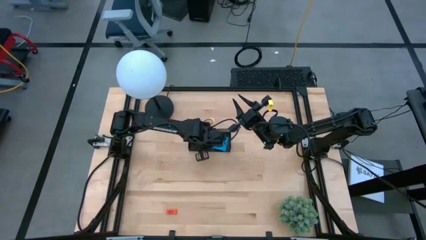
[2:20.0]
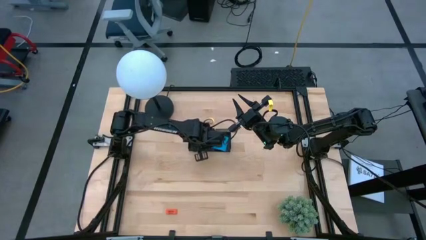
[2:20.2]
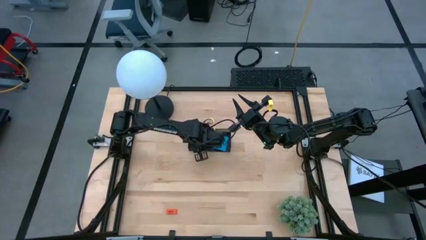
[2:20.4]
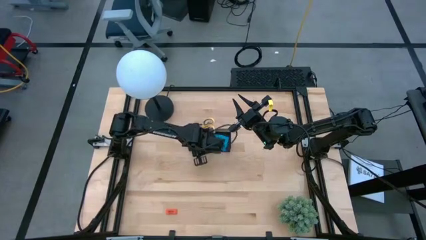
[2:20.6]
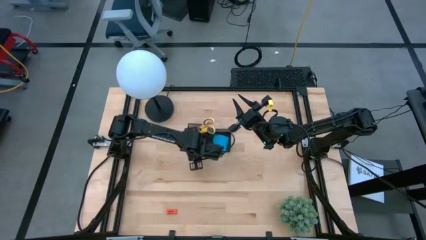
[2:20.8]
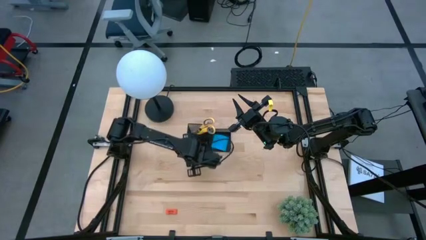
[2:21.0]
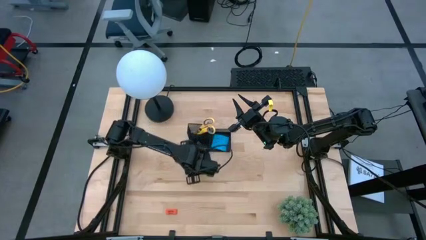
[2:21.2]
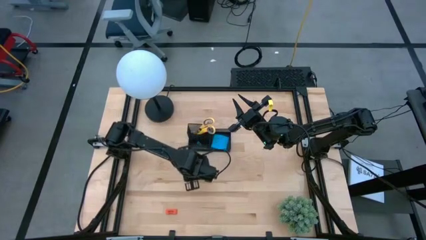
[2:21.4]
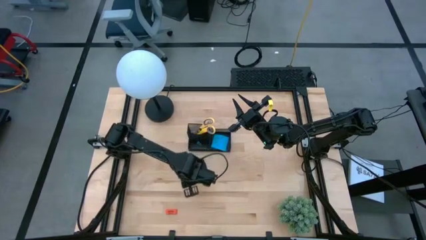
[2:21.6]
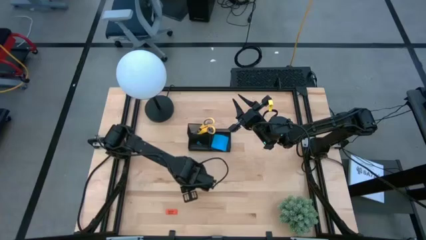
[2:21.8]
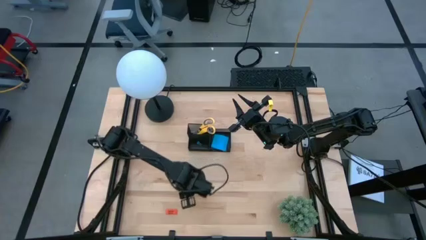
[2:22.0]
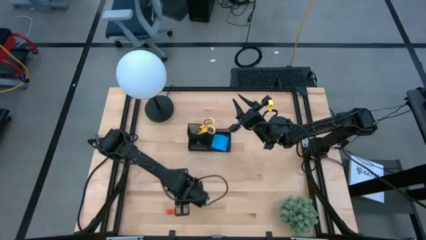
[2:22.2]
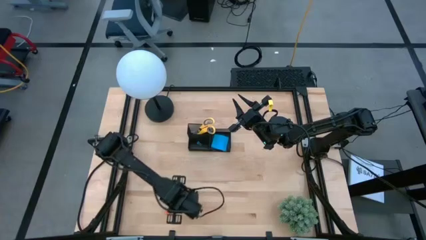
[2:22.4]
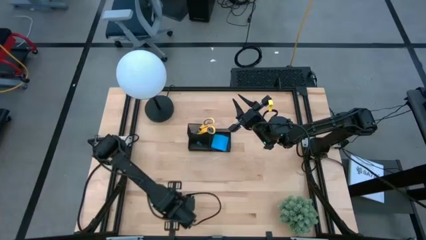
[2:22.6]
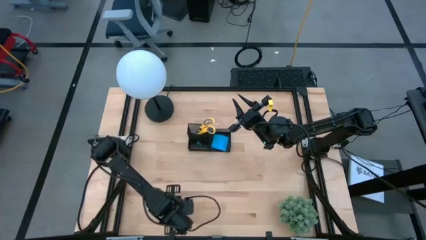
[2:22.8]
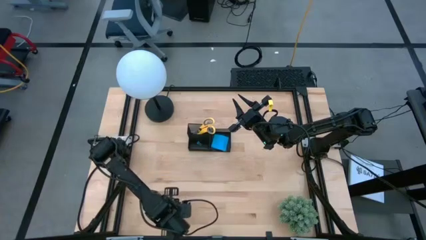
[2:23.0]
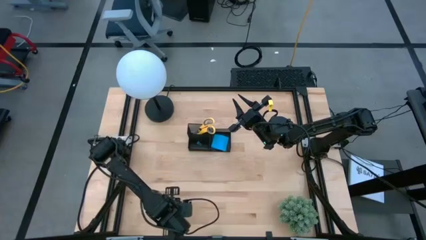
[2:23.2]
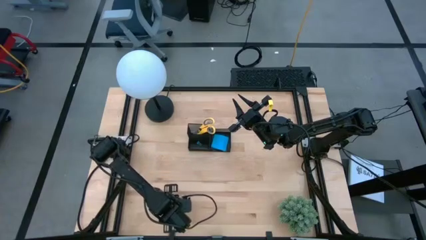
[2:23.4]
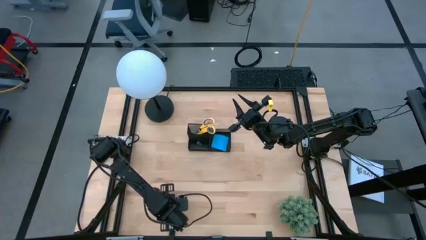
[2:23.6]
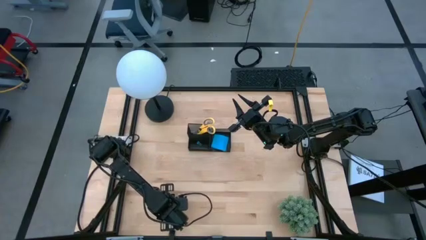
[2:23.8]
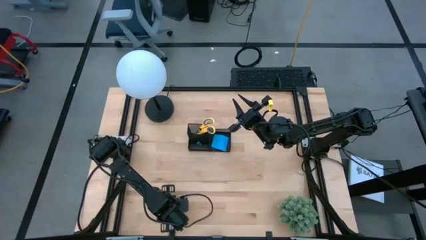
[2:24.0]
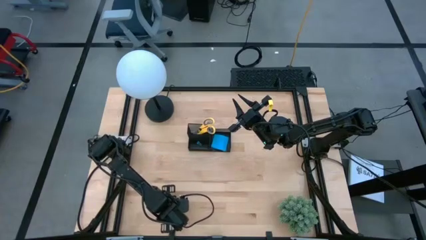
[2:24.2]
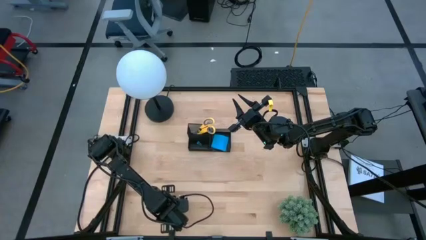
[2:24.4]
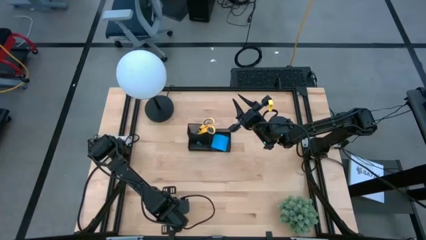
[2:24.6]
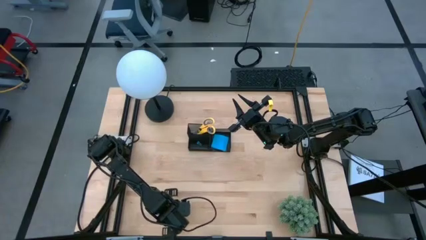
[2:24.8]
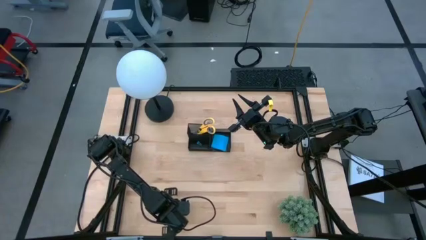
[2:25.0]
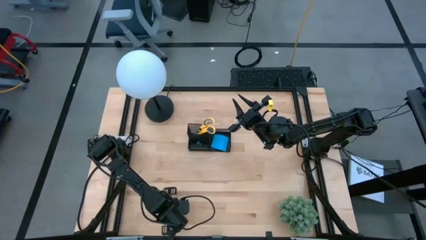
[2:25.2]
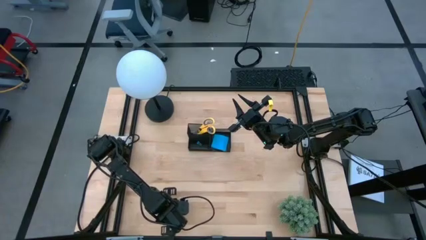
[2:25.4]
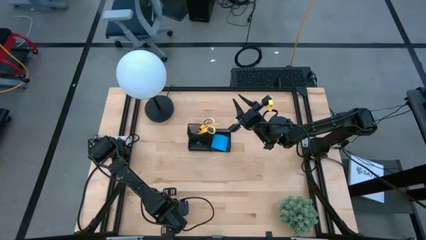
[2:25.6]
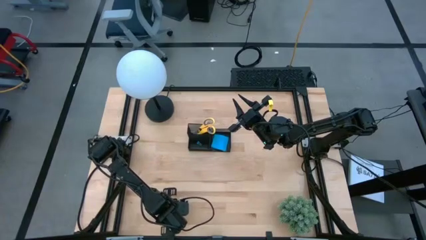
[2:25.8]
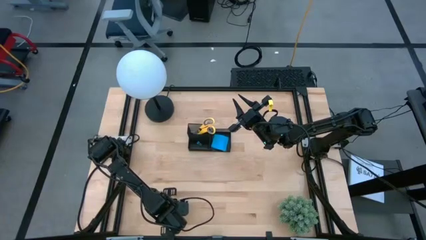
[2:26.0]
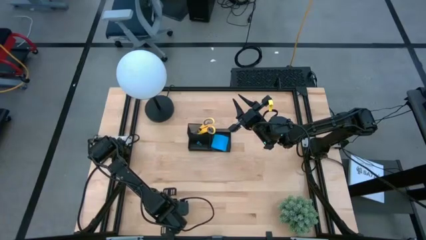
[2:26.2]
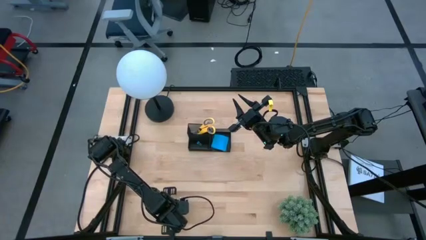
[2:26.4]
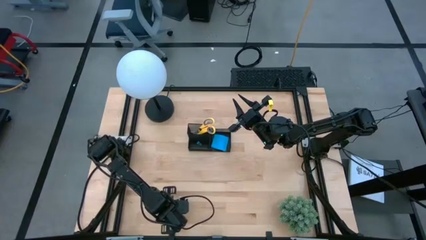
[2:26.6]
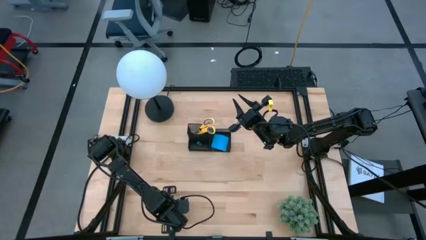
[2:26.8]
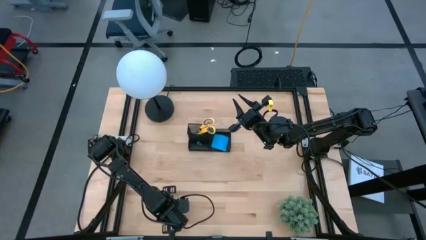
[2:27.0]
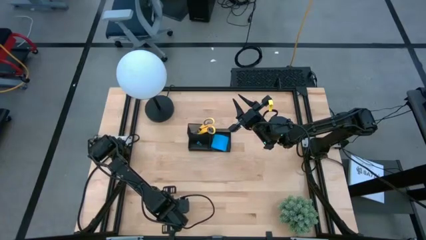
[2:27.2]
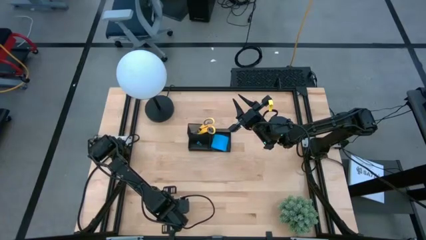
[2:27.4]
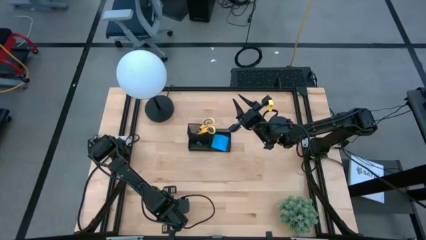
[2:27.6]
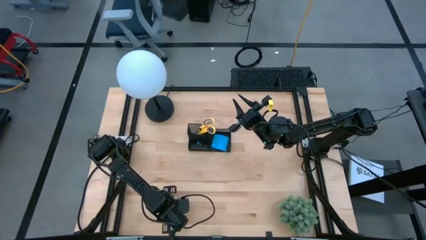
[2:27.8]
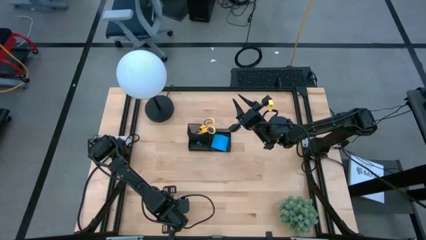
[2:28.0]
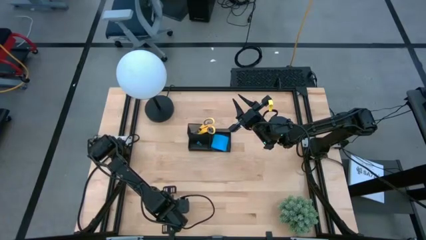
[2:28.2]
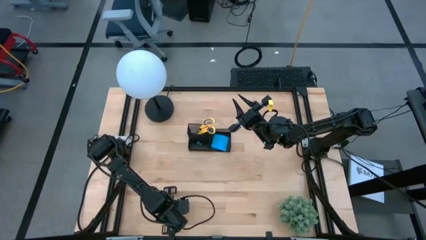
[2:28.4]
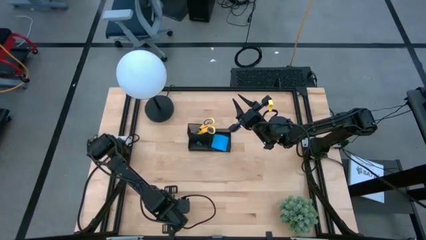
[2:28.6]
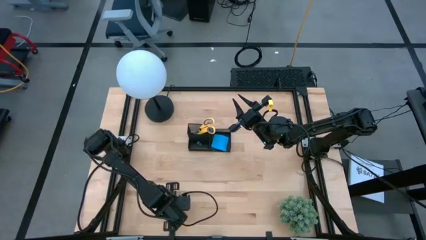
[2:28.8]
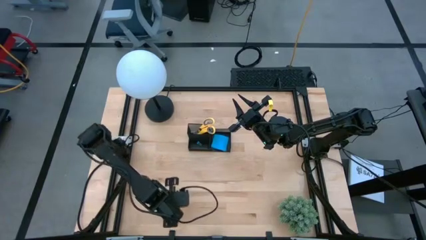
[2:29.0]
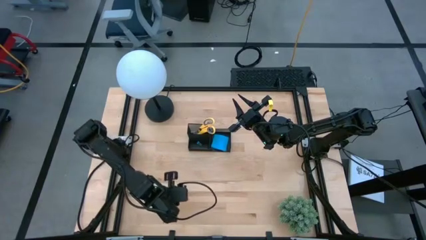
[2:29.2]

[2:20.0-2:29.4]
Task: Pick and place office supplies into organizer
Put the orange eraser into the black mesh desk organizer

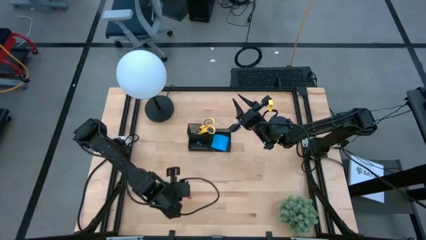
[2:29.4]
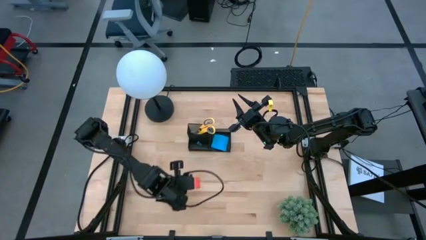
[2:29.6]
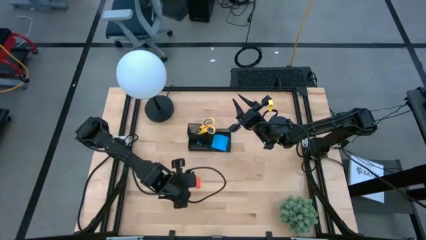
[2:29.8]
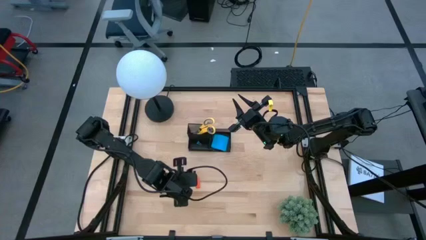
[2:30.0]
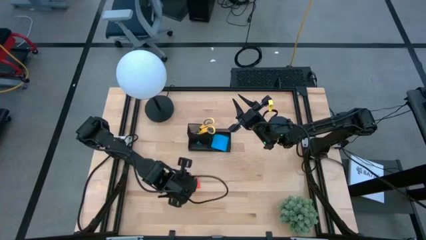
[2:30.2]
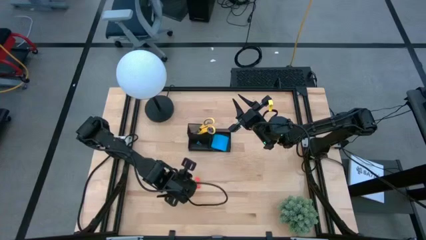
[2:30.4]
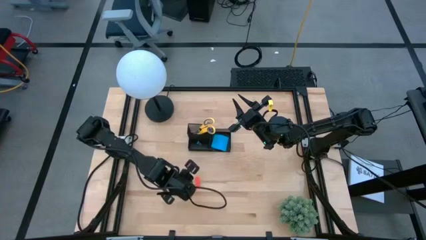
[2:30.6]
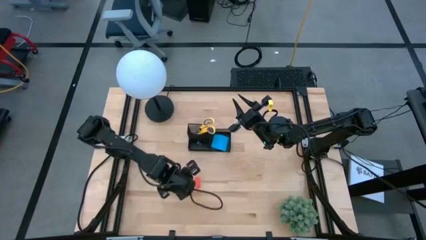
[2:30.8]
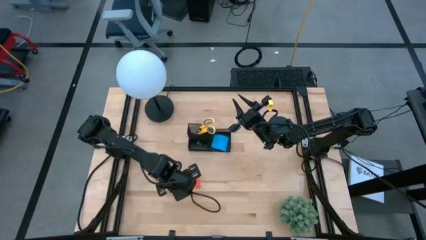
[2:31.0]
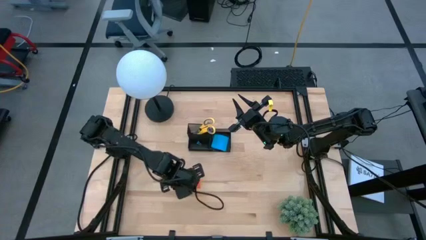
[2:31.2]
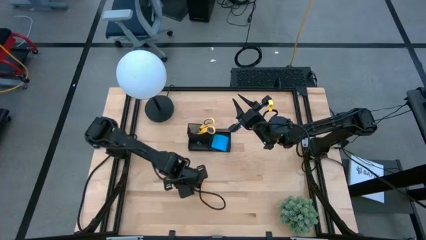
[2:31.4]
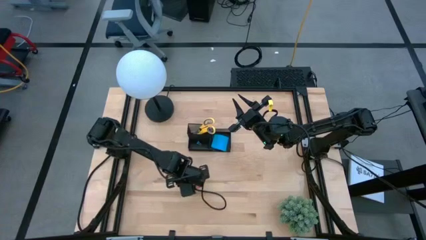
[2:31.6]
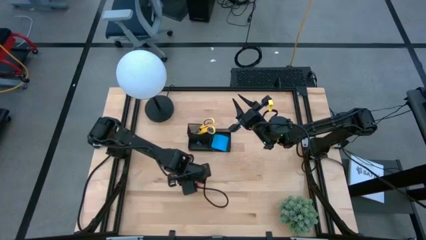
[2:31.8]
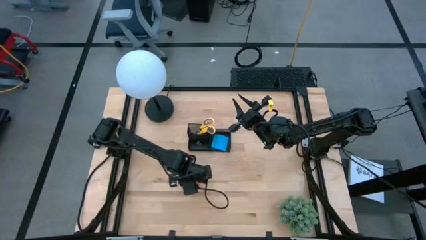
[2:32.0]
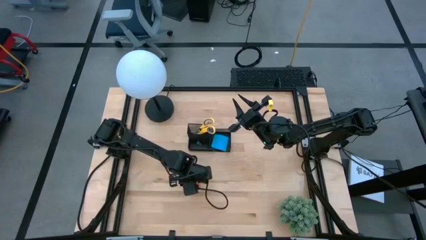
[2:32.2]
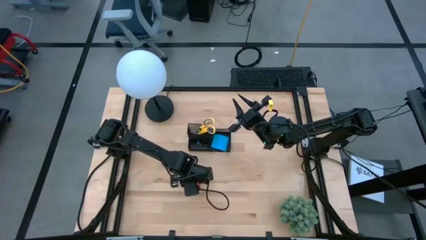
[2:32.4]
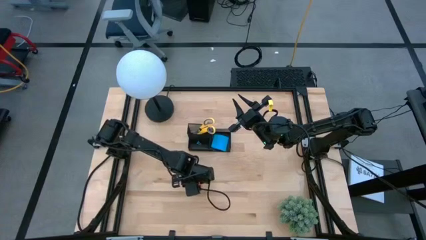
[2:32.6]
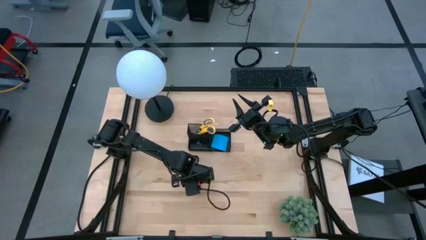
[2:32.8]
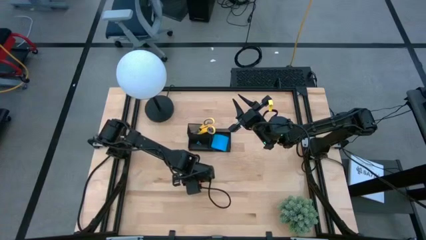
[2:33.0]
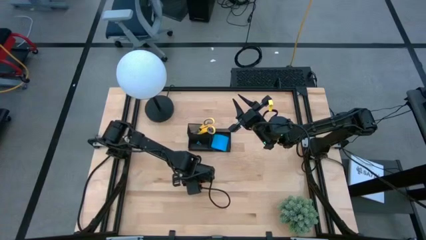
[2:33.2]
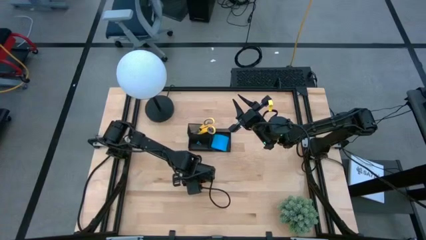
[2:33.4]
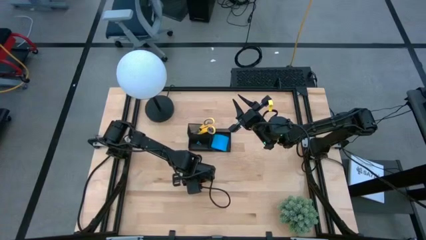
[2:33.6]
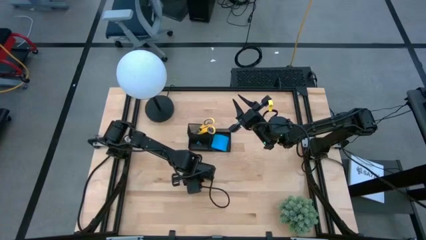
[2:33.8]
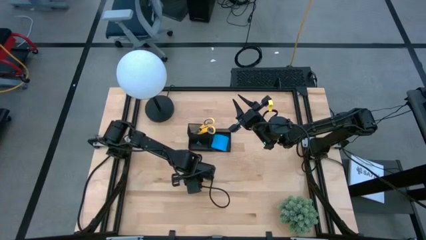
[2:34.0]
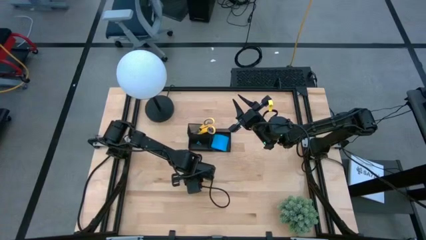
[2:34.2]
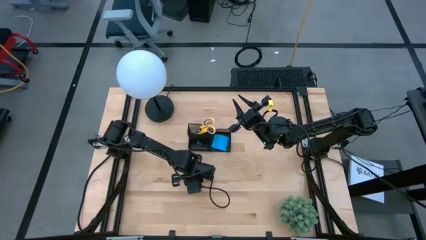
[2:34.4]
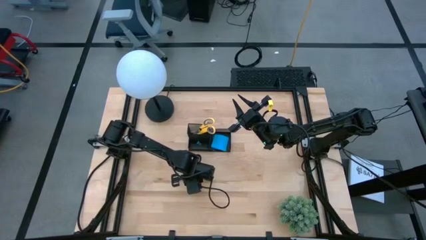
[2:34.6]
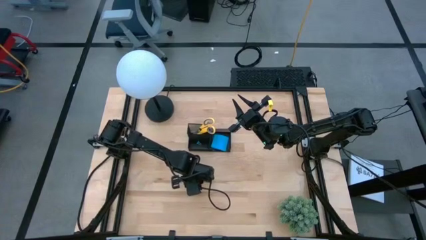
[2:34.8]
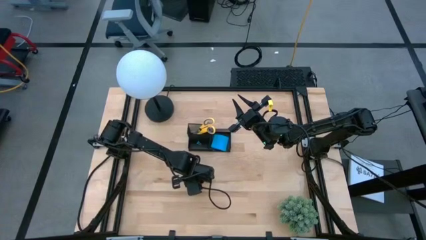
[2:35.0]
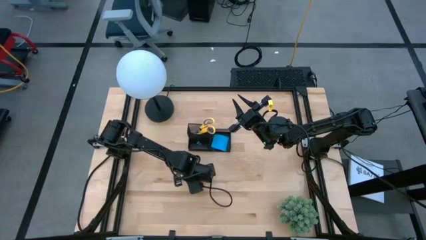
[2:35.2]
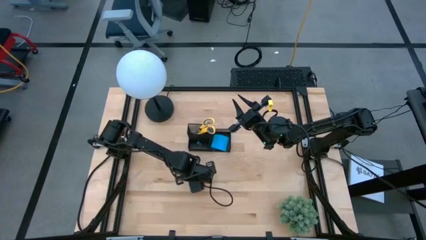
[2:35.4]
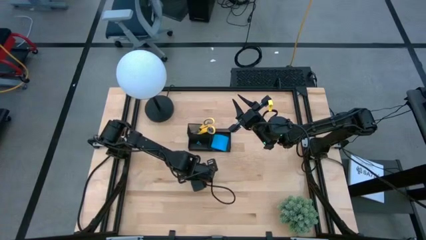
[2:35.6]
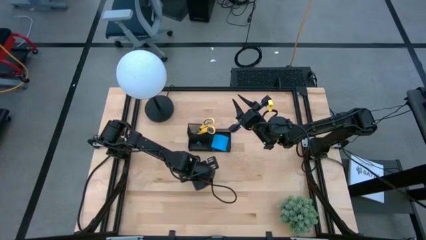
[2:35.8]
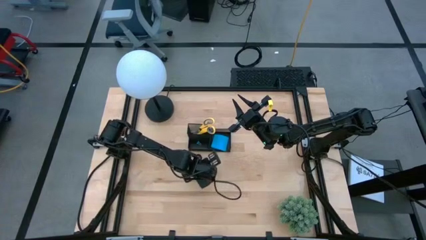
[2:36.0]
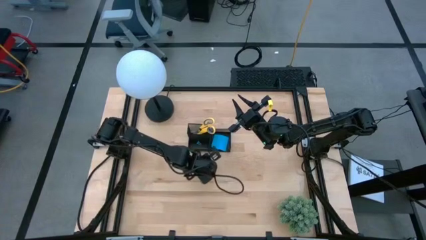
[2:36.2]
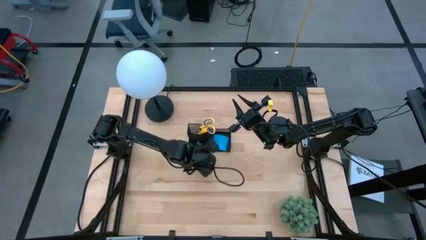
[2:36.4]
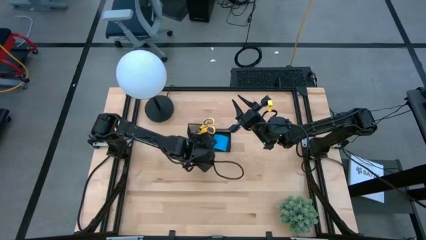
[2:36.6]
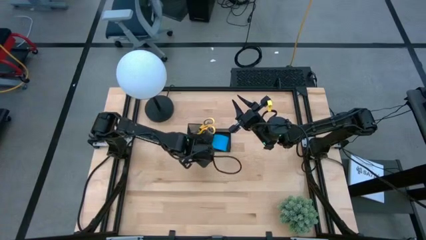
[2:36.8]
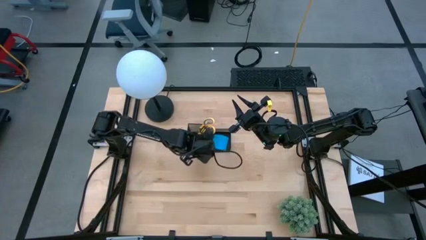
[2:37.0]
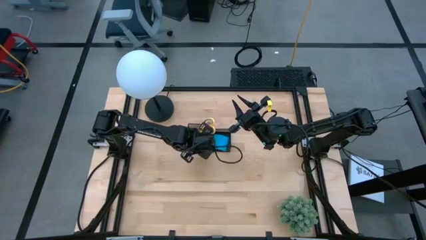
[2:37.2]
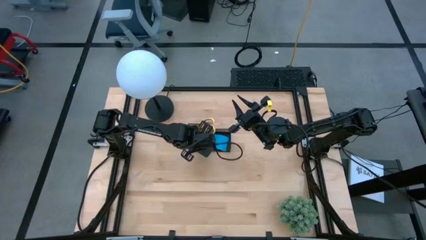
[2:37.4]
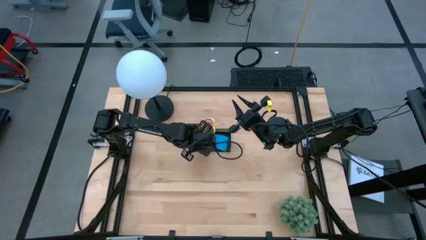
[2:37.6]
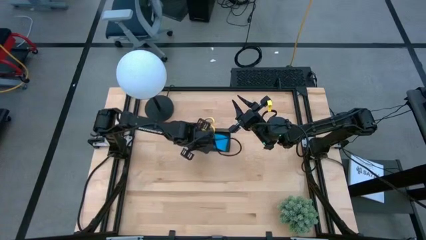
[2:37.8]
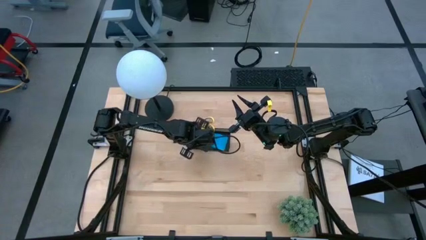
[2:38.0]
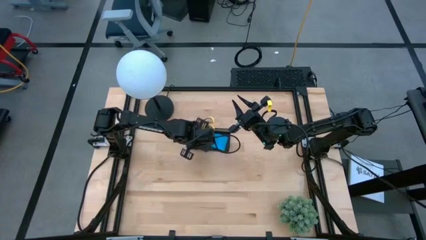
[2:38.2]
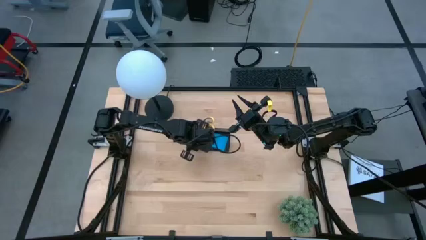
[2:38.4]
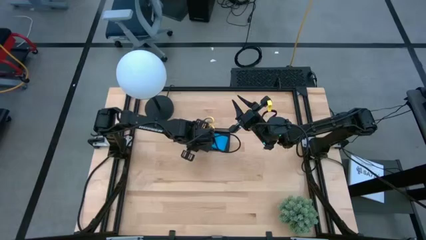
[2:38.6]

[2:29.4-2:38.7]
Put the orange eraser into the black mesh desk organizer
